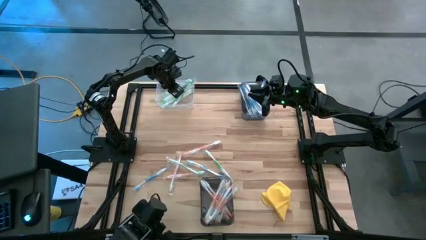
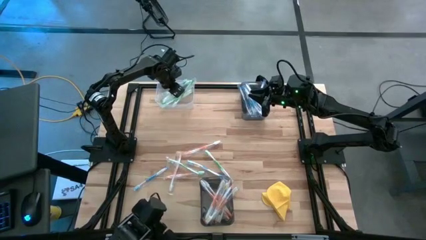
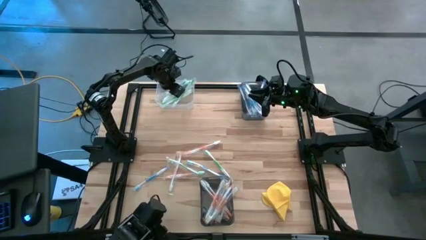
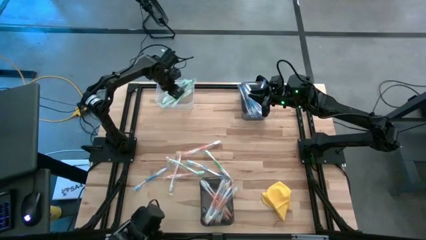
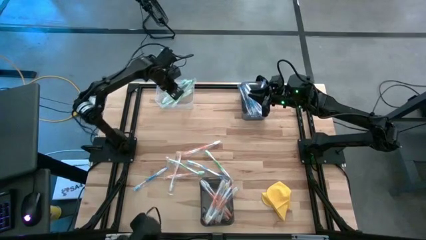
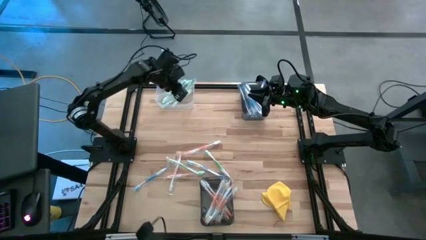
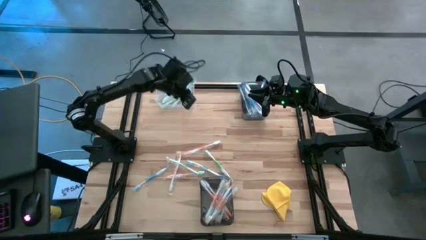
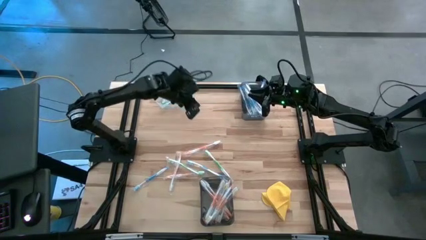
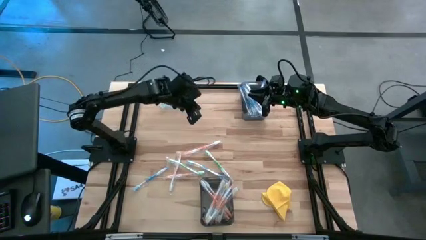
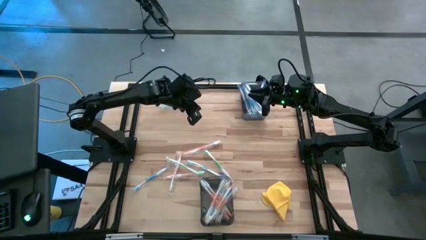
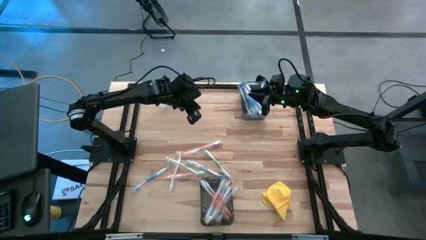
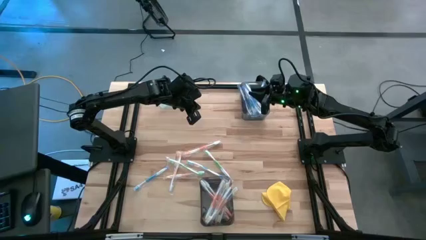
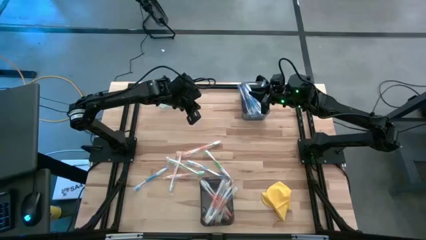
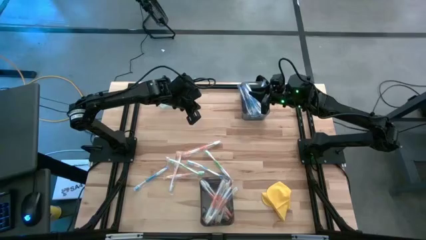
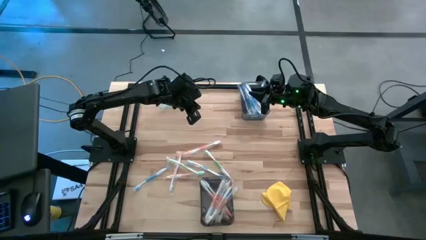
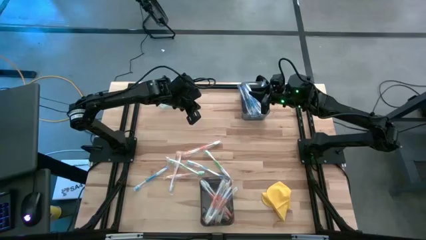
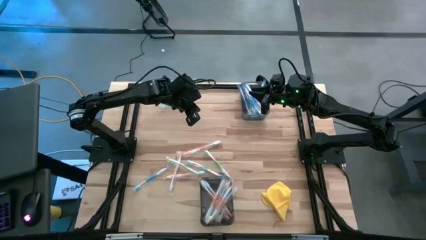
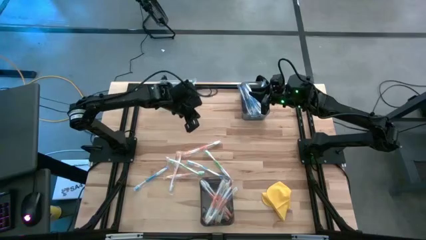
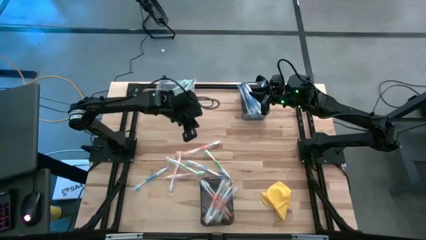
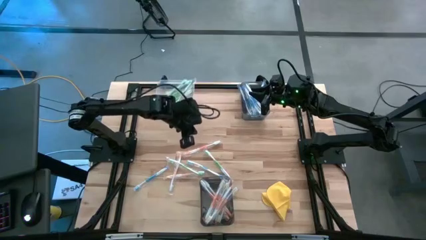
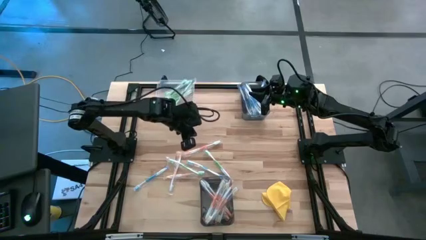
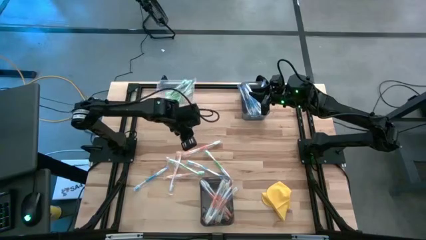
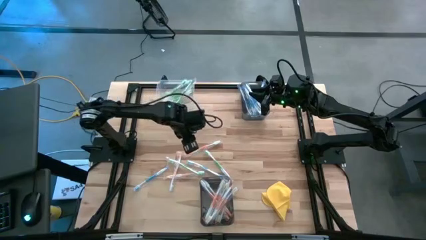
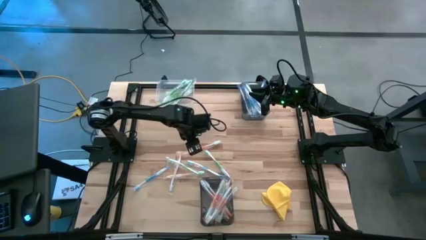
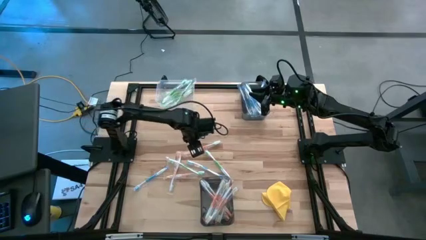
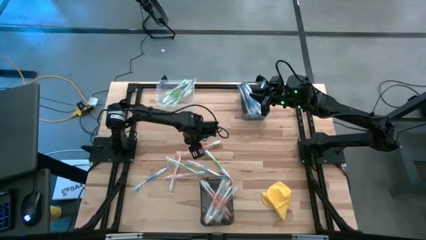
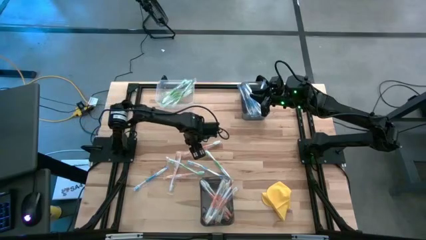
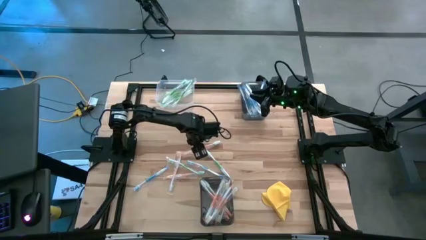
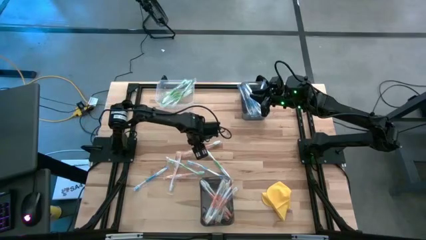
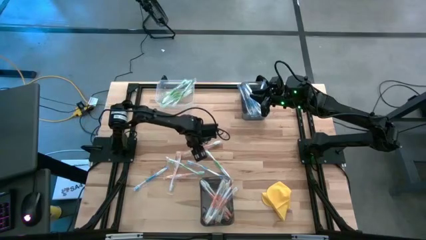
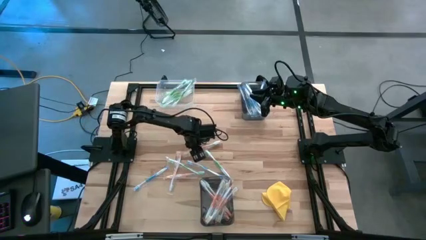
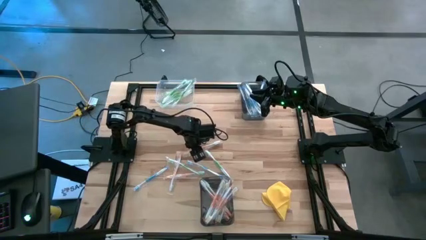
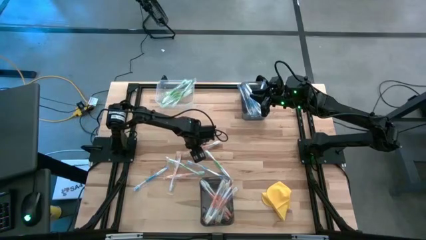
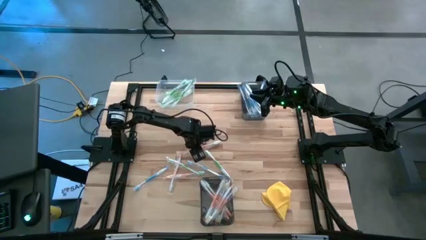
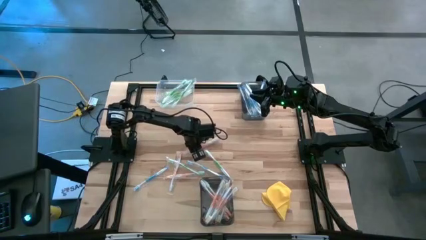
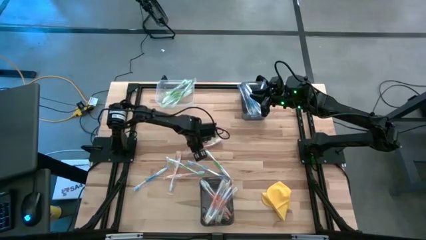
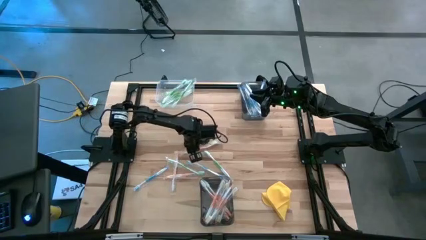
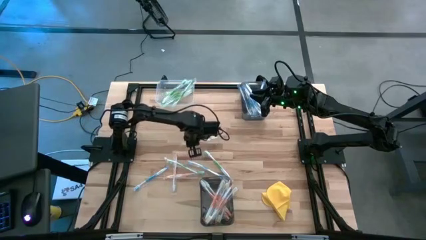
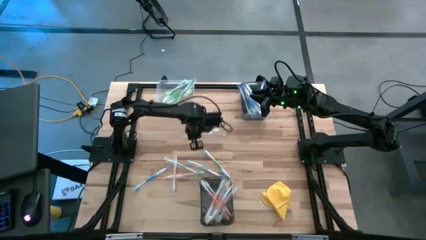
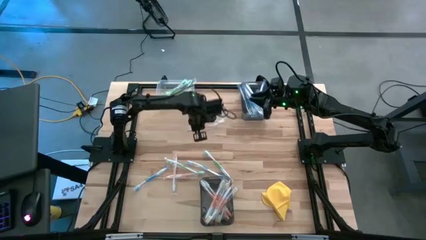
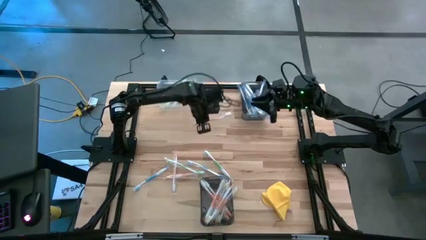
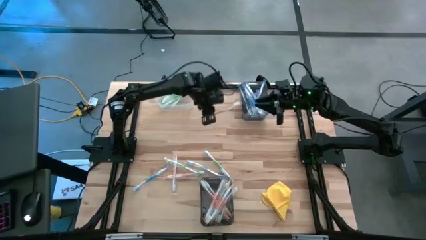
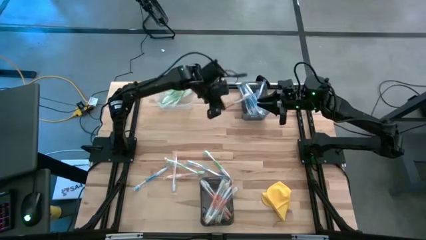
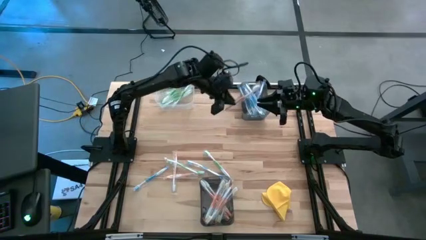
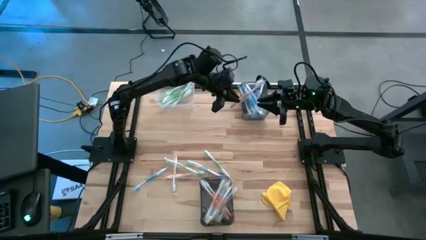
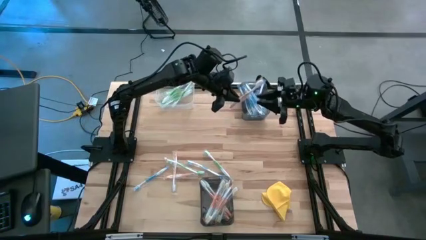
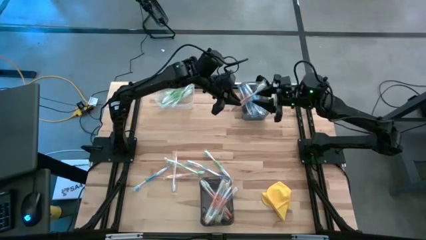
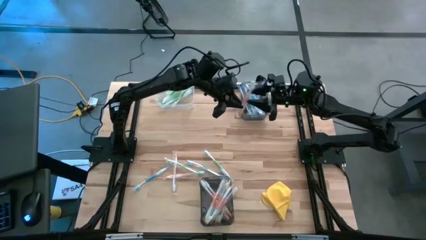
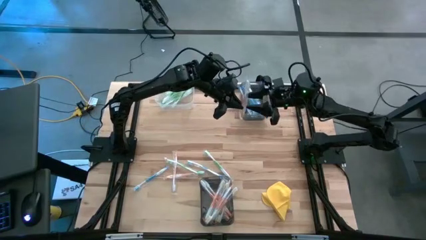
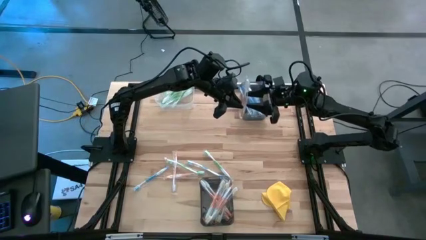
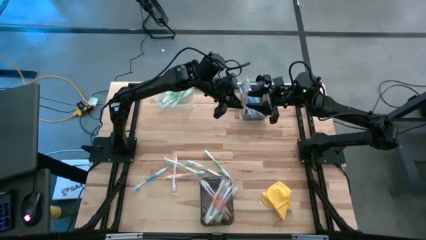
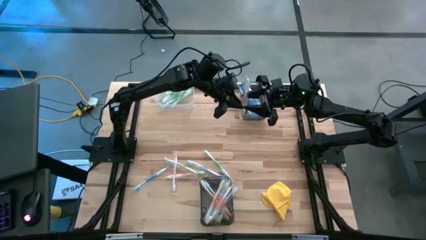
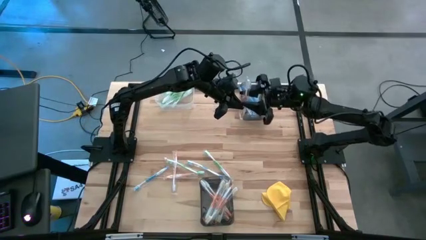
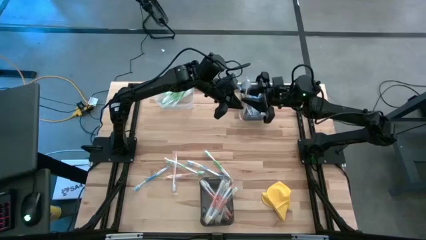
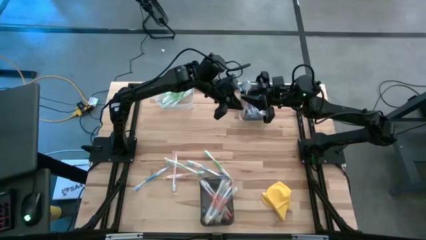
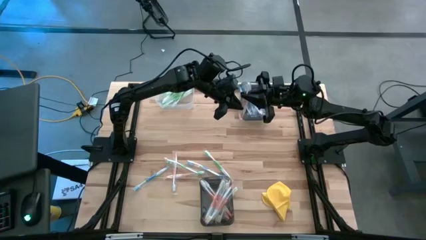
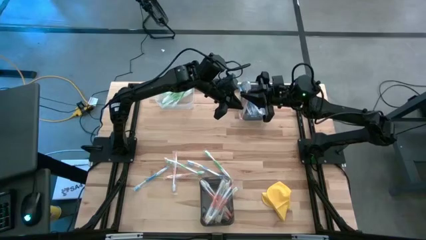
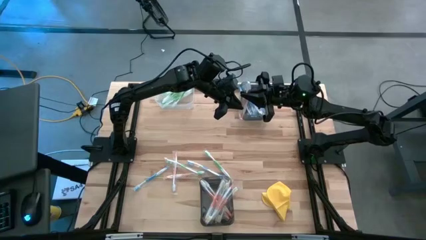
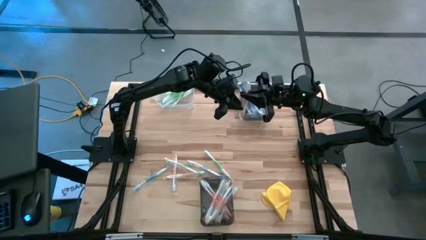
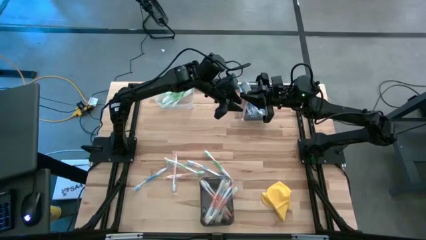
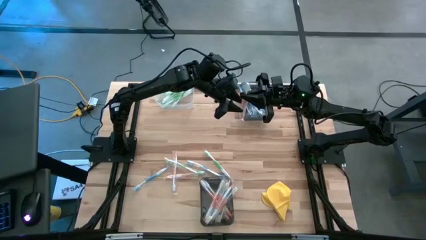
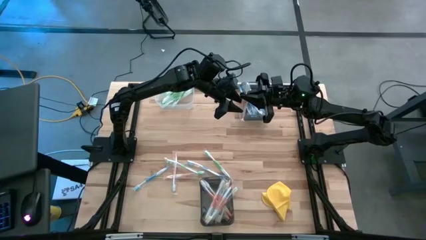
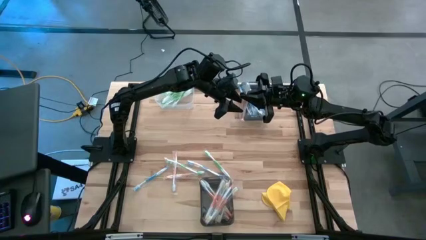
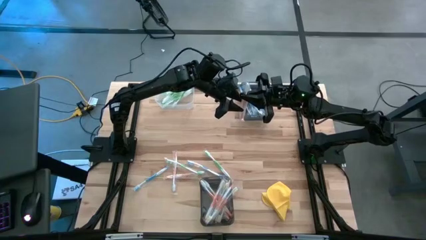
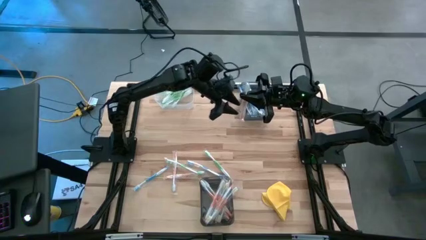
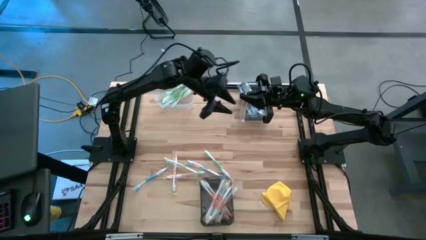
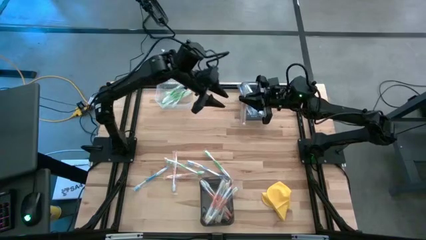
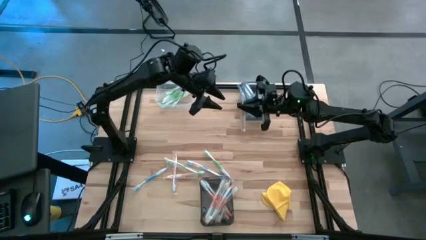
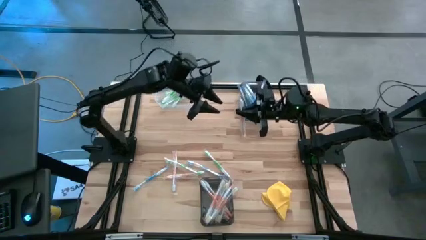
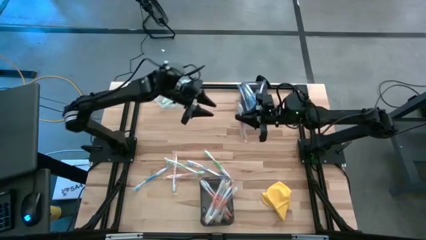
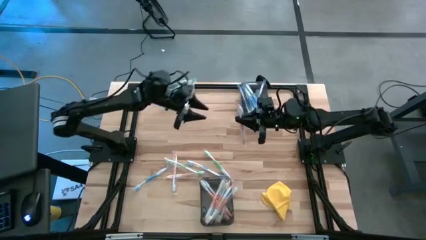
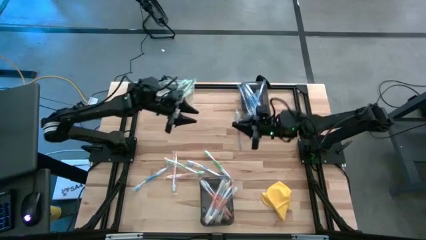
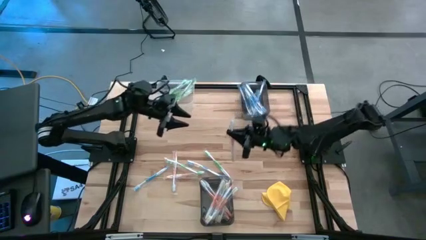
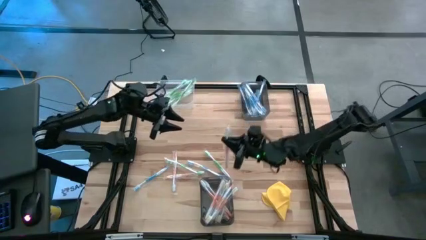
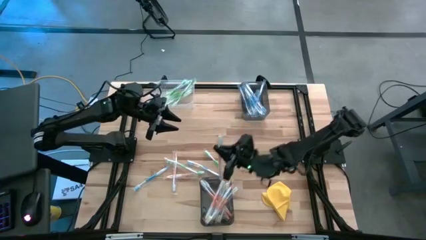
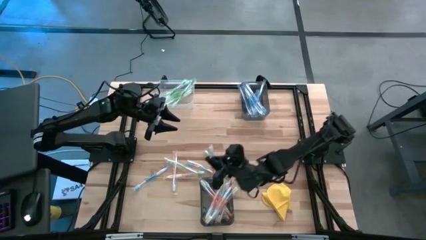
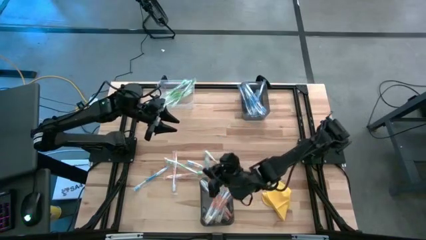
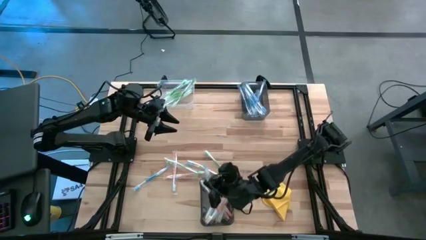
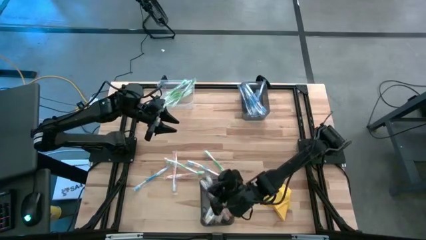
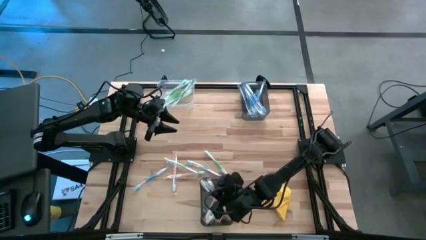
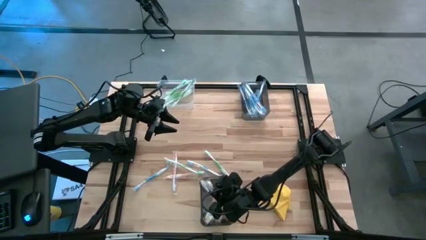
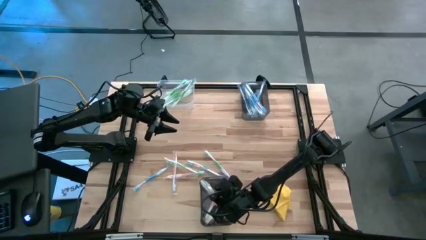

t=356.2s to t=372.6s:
Task: Pick & Place Toothbrushes
Put the orange toothbrush into the bottom black bin
